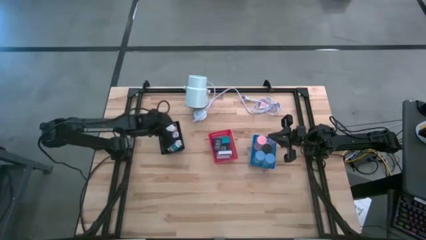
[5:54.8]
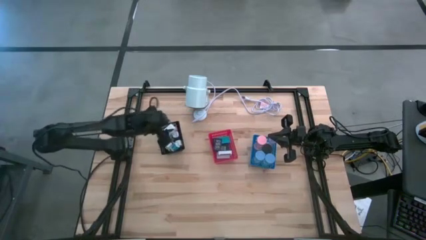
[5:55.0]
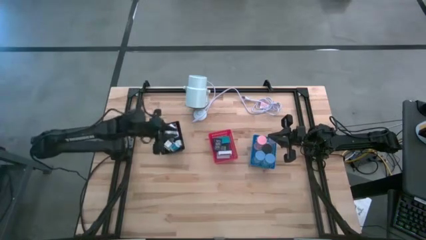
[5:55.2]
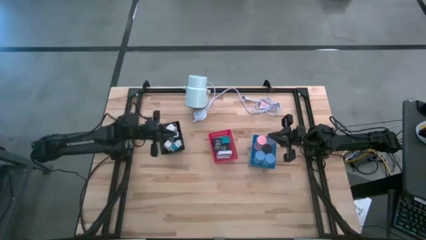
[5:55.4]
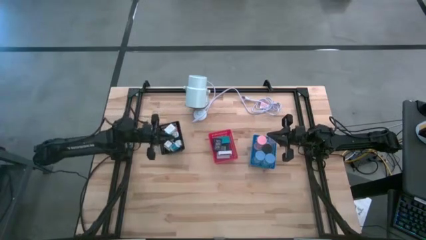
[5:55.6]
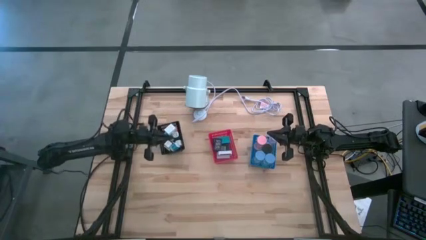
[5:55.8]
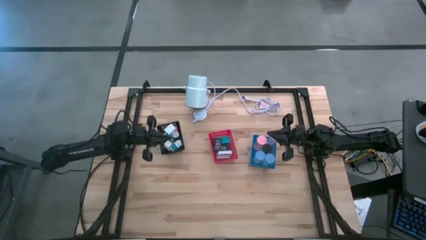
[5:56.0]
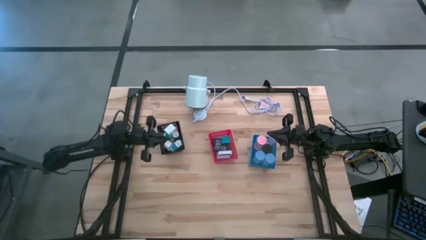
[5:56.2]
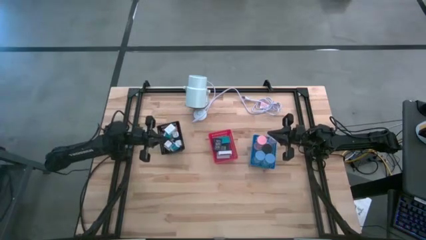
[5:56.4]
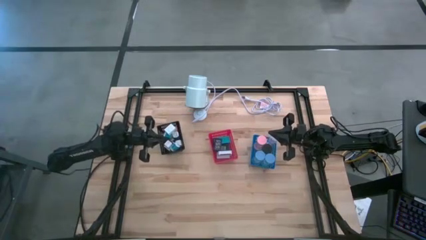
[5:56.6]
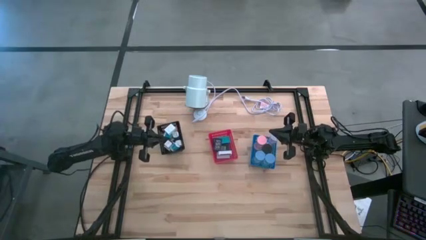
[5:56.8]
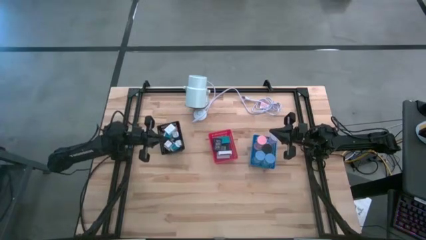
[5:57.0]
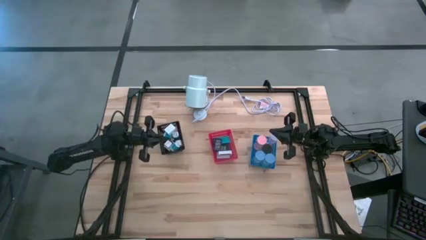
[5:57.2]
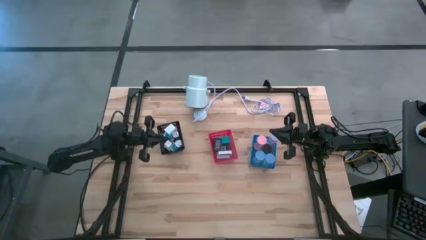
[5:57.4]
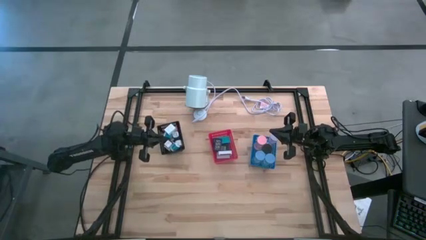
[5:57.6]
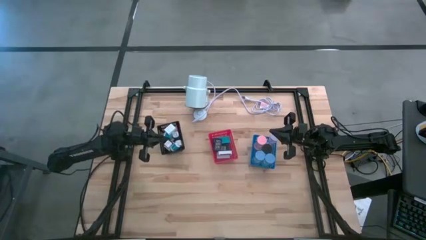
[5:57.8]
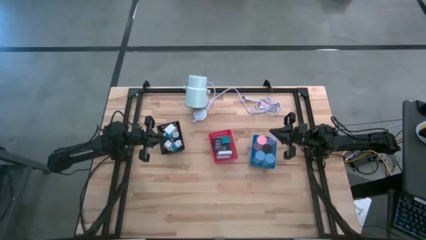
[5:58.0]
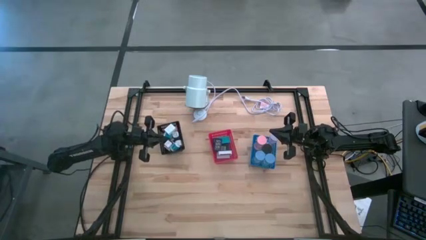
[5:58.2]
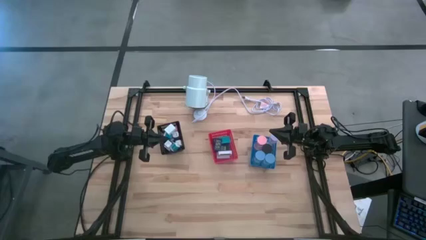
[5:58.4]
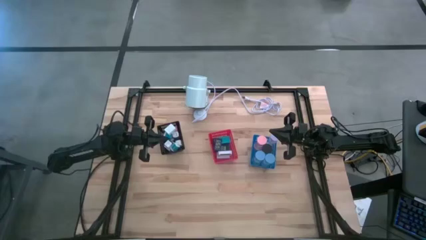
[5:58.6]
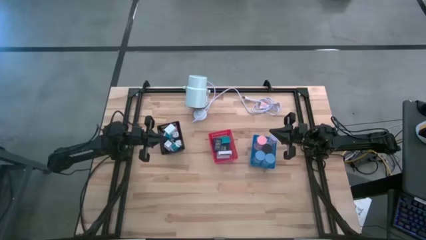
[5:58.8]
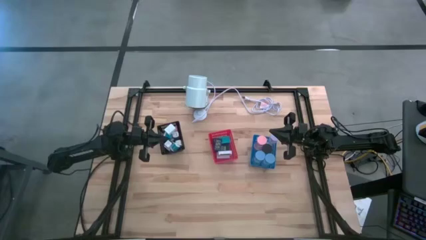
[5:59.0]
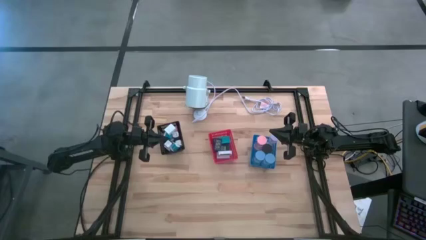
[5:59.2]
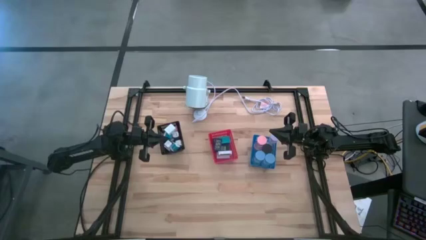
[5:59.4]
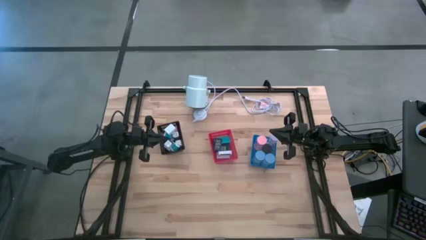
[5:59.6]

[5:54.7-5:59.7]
Task: Pick & Place Office items
Return to Home Position

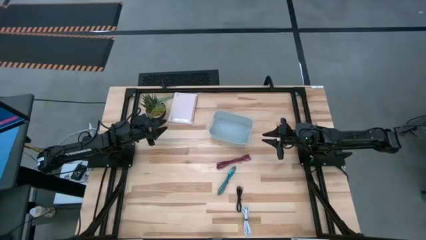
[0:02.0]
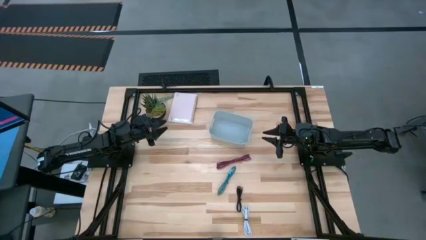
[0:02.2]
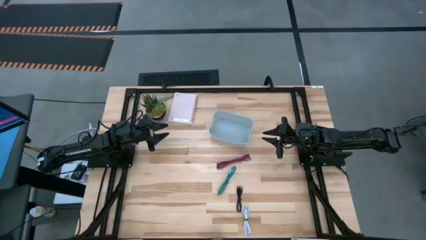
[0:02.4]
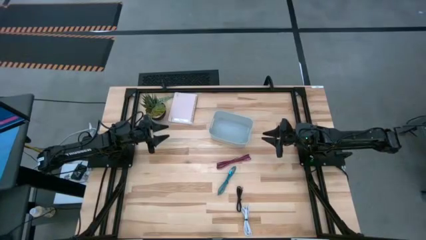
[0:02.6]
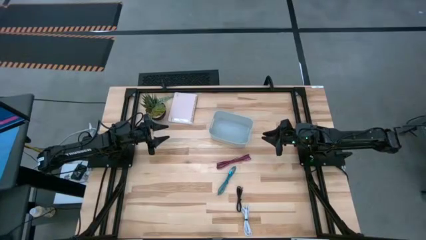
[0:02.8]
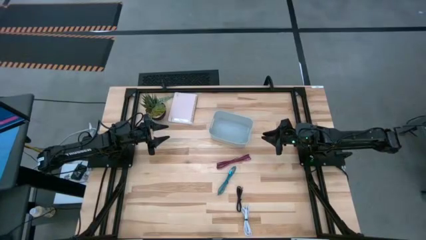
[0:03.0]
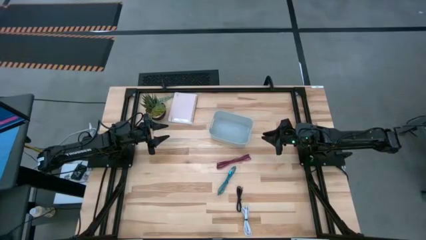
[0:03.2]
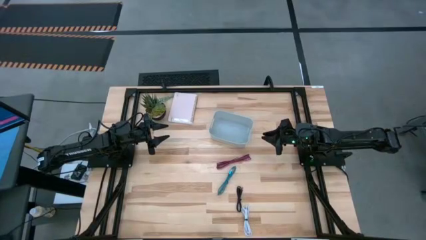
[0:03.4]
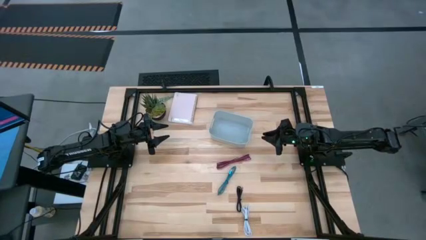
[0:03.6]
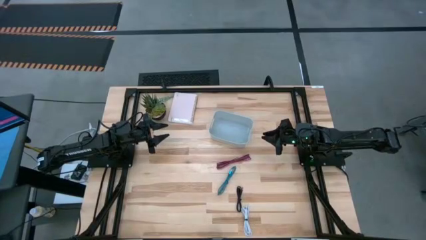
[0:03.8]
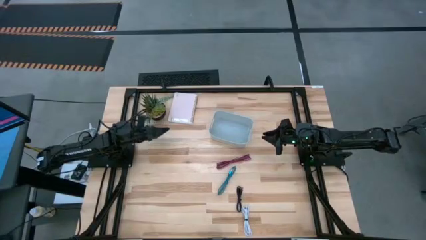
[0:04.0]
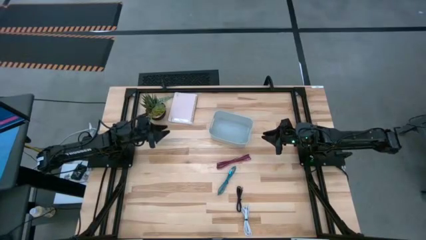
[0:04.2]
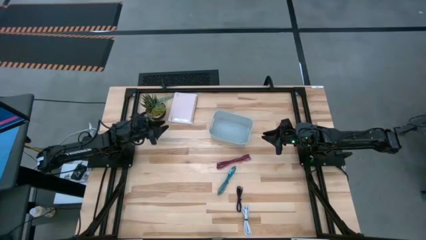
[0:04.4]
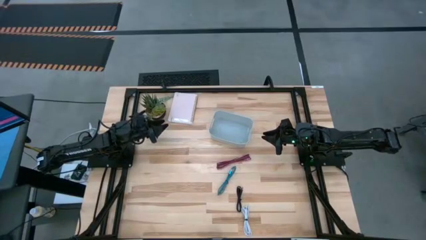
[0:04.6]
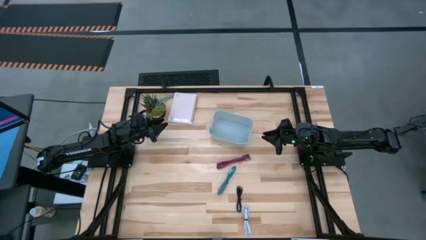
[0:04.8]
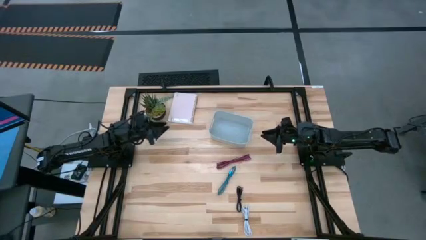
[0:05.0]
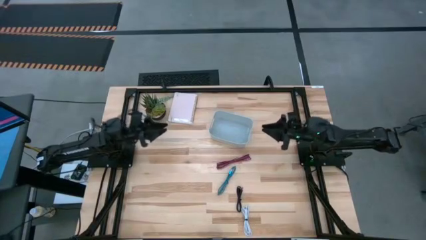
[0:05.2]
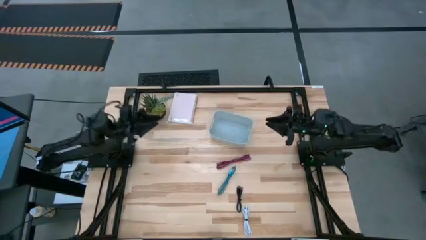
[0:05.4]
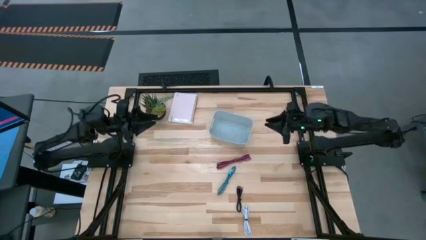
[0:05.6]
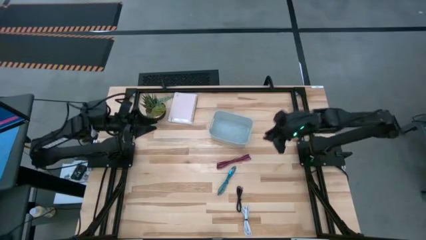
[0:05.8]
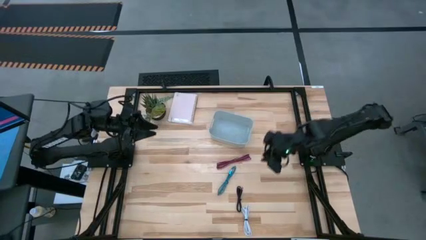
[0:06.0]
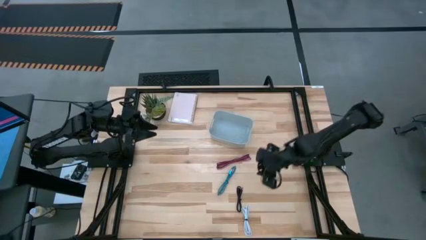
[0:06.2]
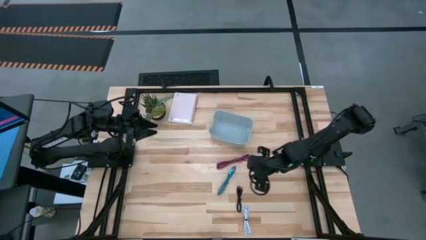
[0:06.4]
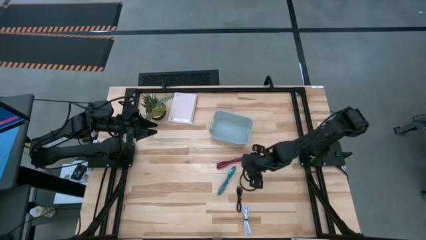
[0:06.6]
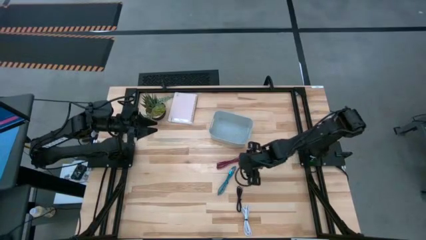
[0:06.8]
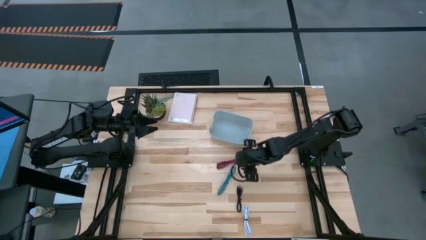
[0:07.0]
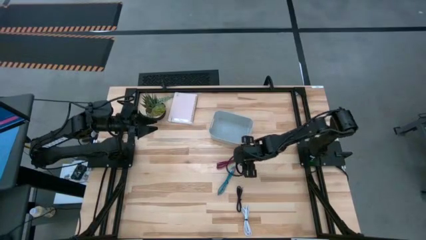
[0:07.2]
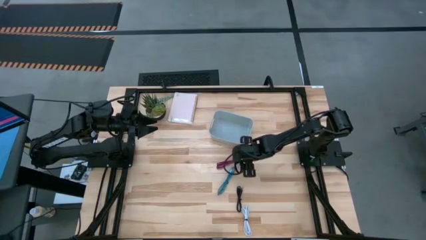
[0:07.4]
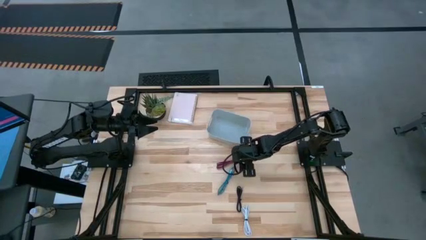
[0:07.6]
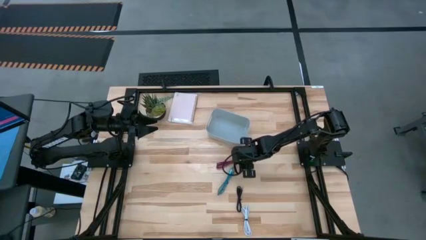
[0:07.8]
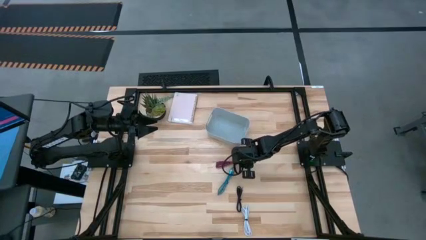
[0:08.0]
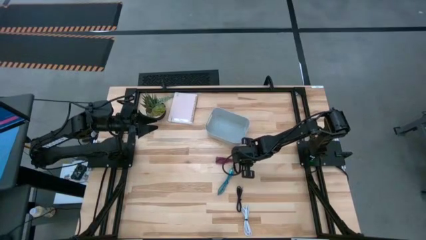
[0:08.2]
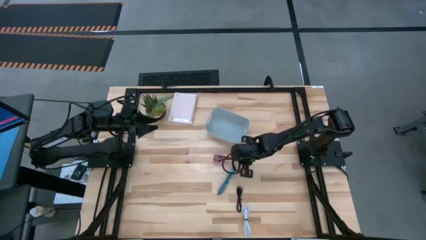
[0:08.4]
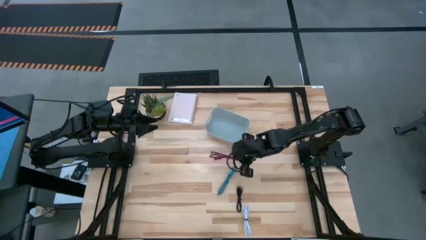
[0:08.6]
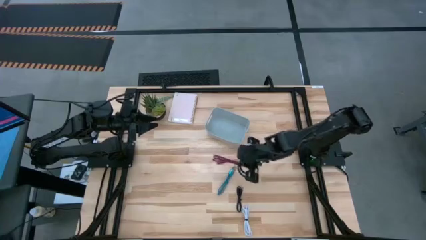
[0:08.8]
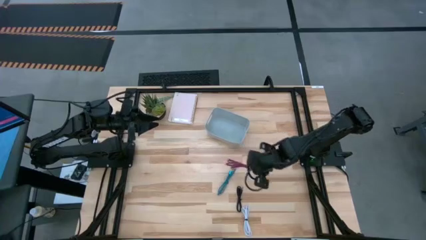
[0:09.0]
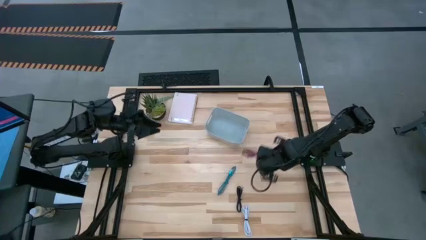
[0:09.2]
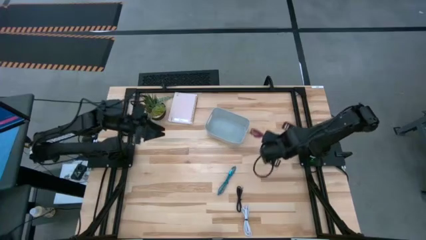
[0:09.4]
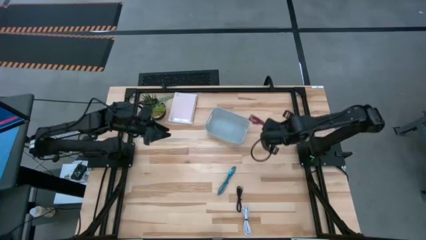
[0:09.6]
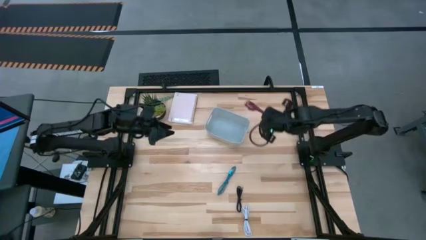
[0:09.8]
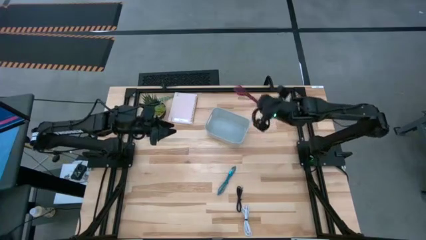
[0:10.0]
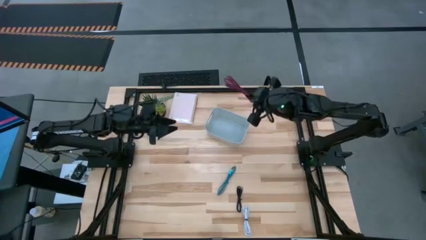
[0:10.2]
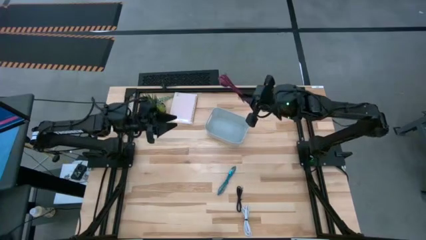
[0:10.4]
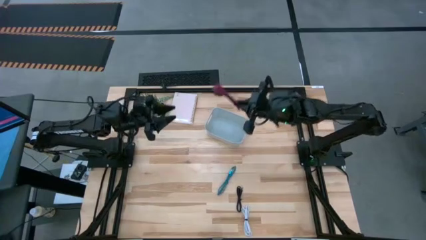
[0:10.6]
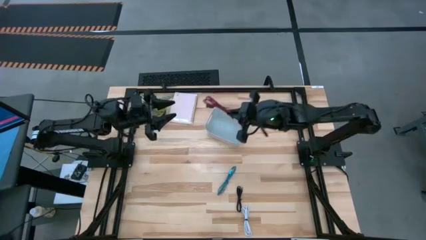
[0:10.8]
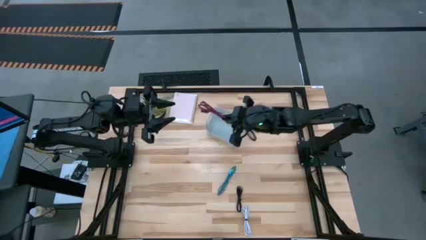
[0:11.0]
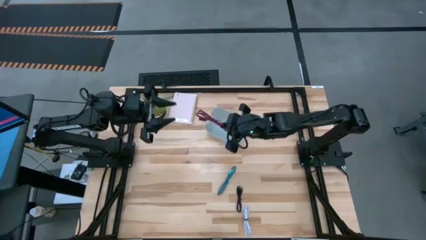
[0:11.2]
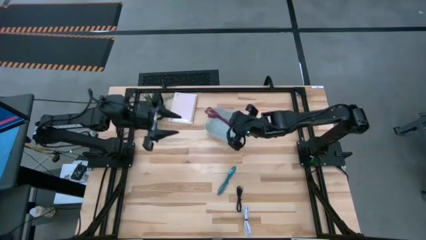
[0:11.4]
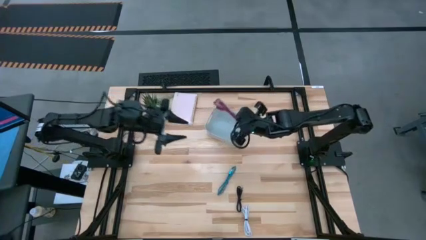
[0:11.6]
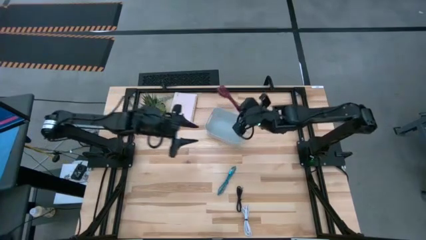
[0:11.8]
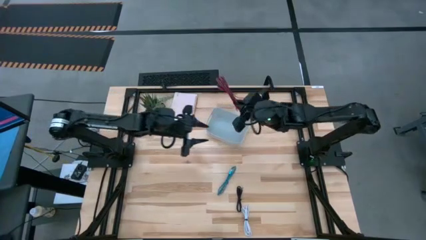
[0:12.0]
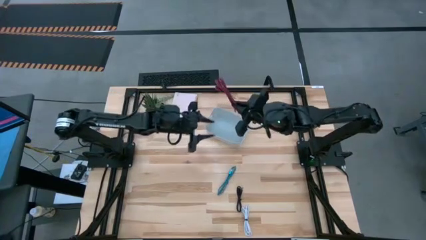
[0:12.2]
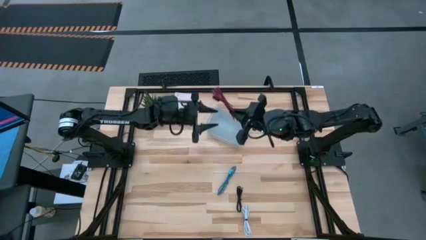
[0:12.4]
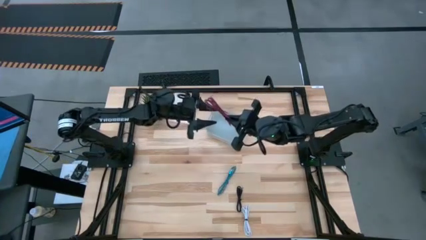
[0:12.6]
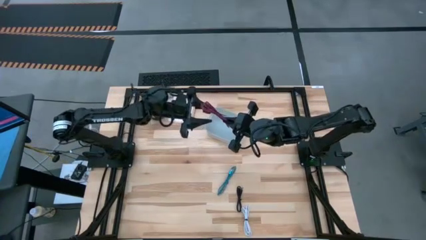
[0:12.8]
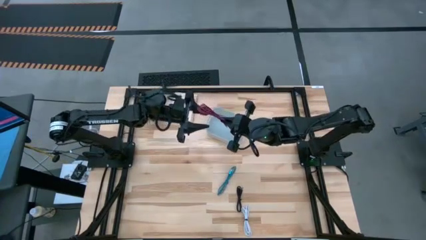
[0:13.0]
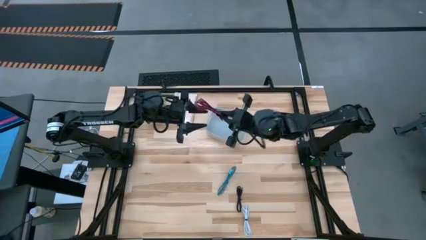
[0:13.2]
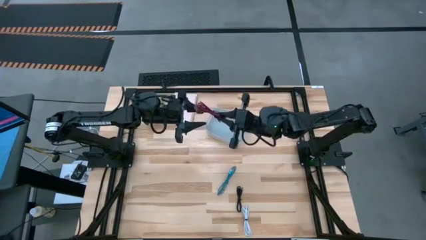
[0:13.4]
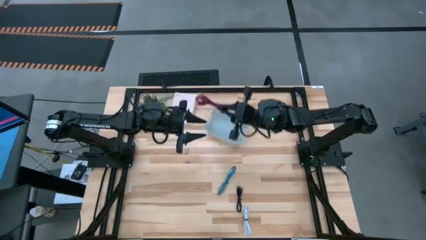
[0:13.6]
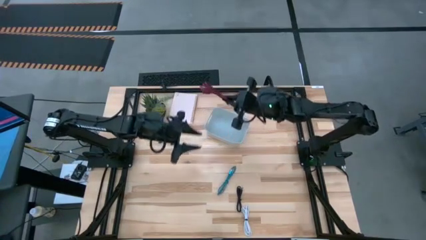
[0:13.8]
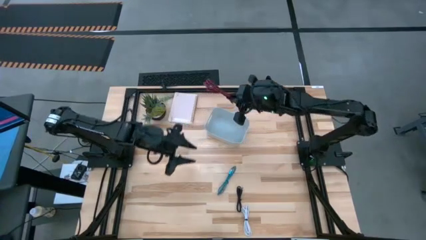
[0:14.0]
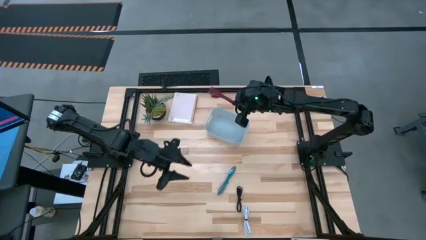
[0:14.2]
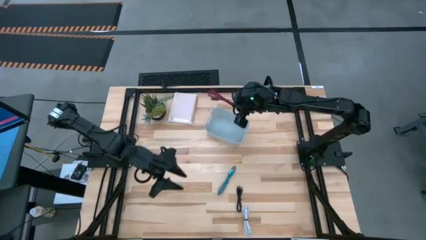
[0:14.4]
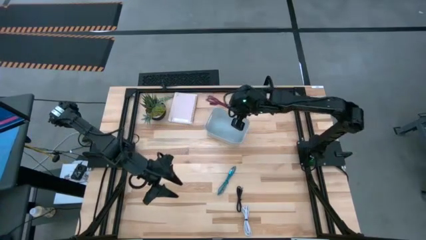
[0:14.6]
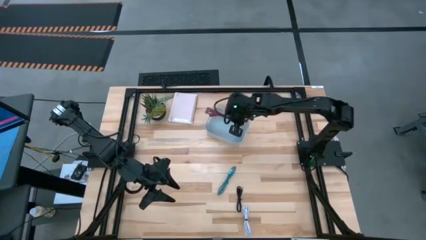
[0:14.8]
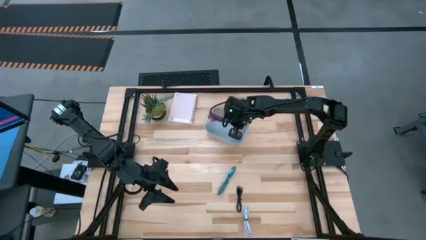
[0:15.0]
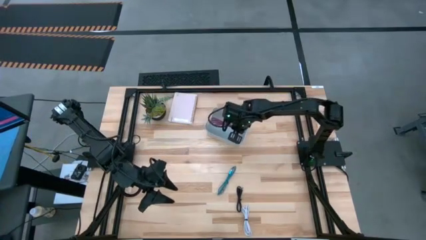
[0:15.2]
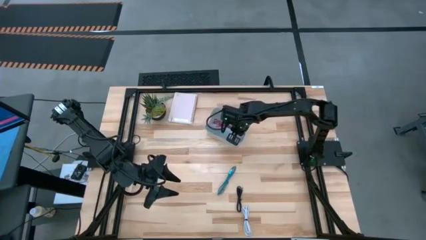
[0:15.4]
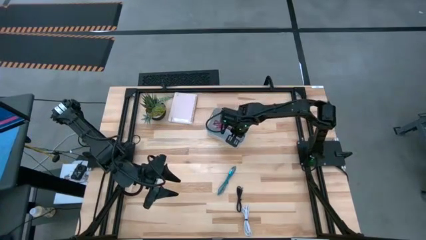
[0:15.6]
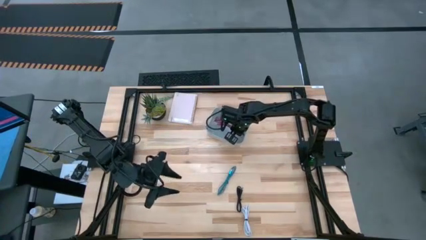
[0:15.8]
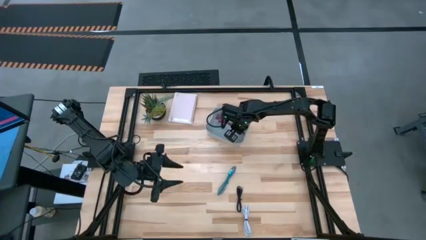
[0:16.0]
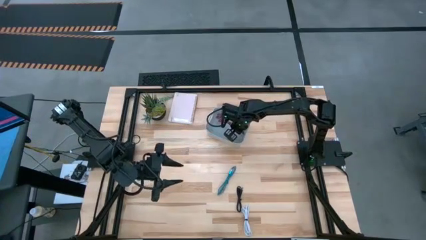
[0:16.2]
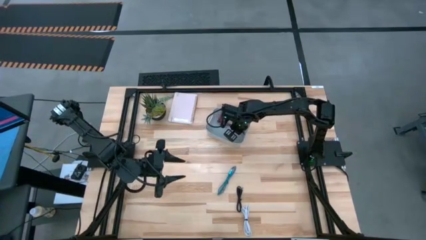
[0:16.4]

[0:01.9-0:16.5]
Task: Pick and place USB-C Cables
Put the pink charger cable into the gray bin
